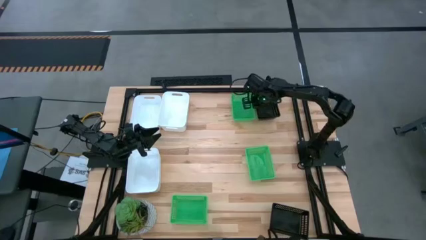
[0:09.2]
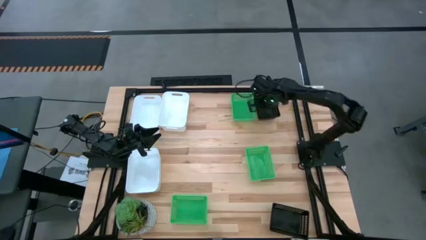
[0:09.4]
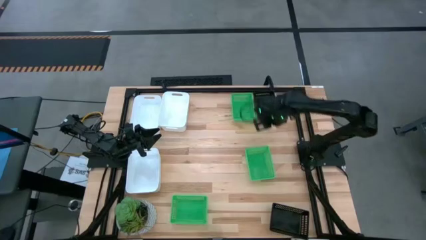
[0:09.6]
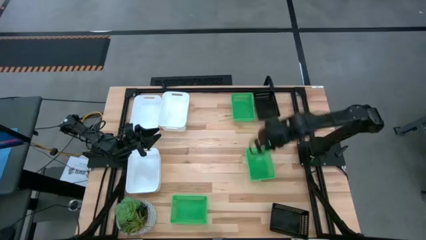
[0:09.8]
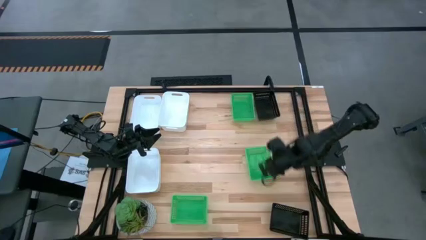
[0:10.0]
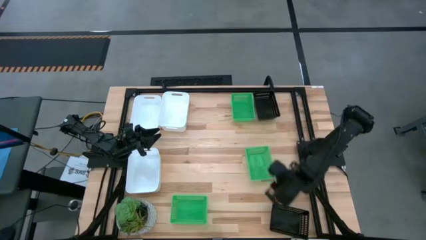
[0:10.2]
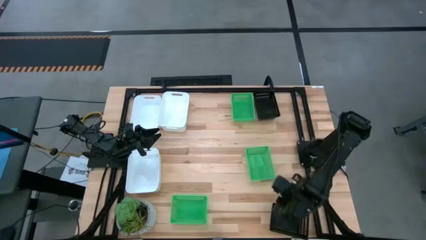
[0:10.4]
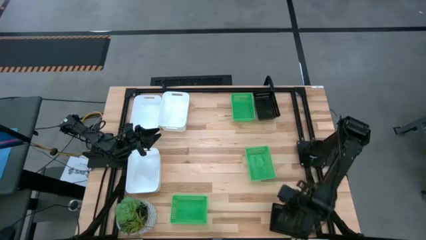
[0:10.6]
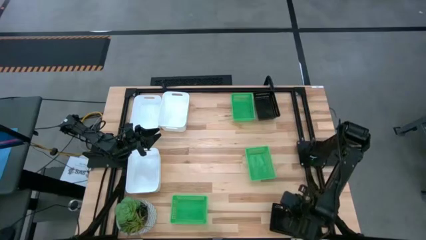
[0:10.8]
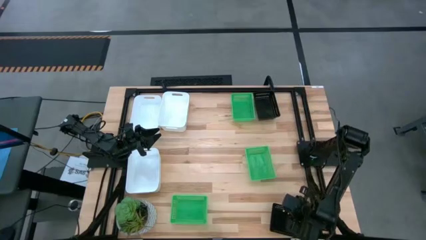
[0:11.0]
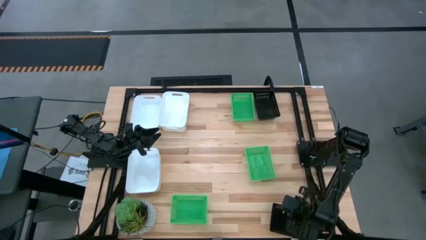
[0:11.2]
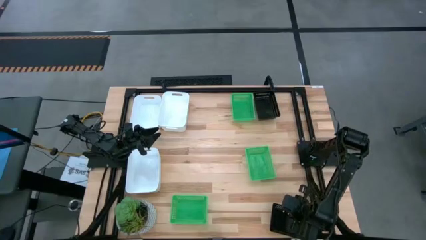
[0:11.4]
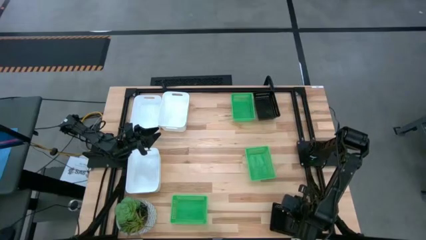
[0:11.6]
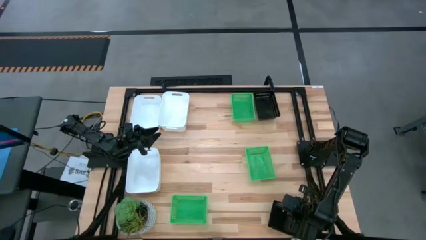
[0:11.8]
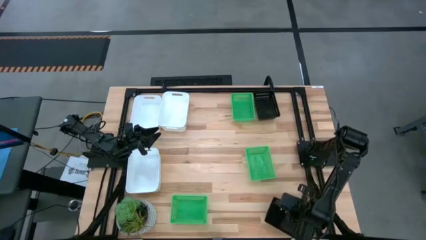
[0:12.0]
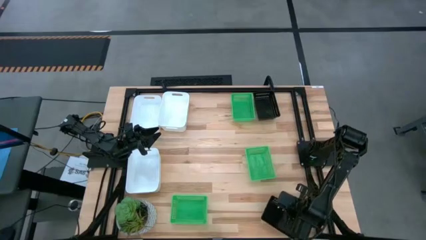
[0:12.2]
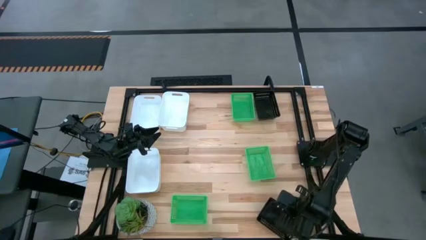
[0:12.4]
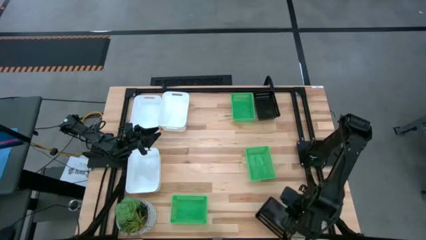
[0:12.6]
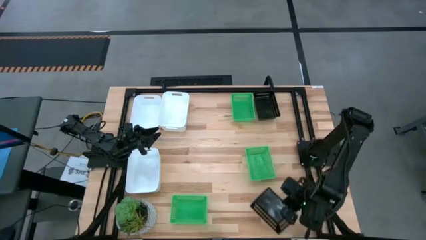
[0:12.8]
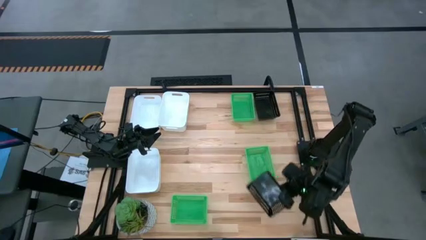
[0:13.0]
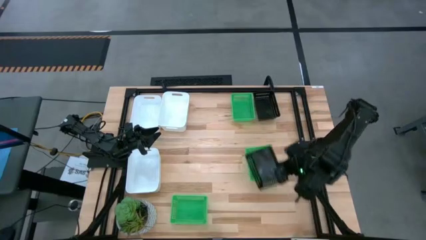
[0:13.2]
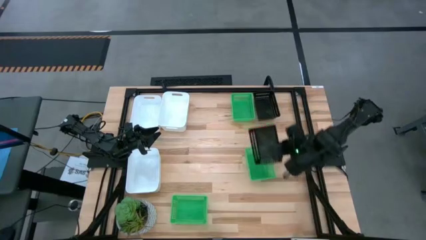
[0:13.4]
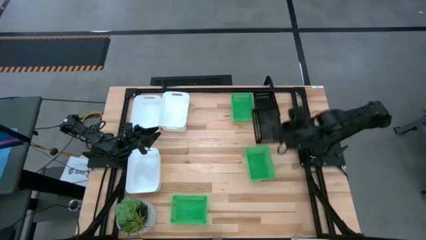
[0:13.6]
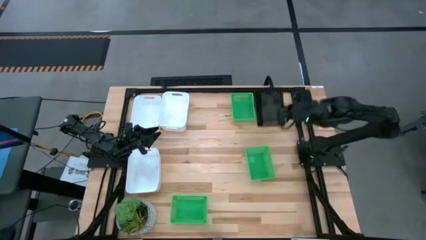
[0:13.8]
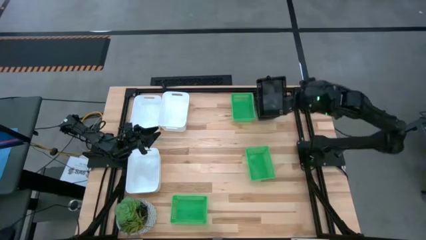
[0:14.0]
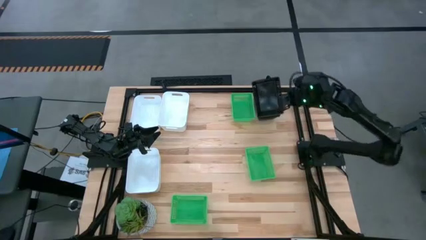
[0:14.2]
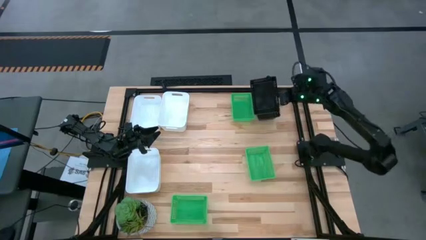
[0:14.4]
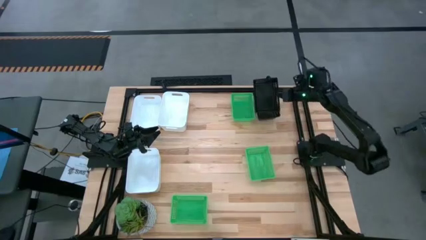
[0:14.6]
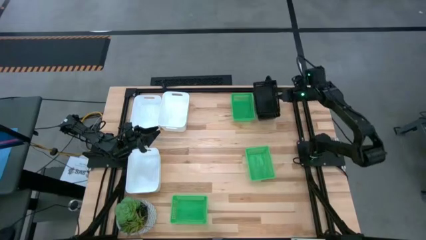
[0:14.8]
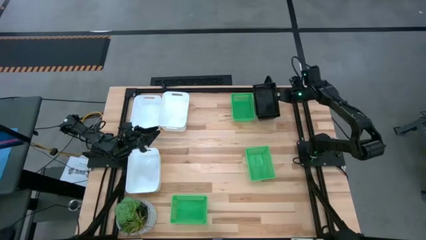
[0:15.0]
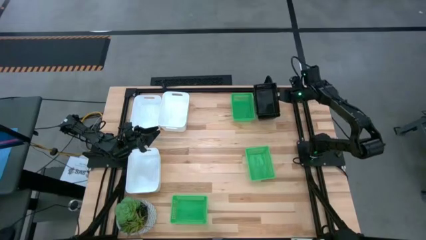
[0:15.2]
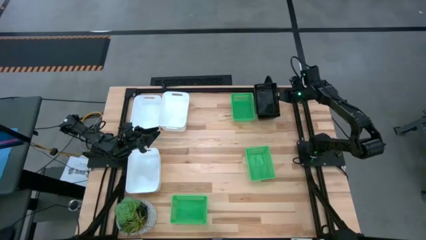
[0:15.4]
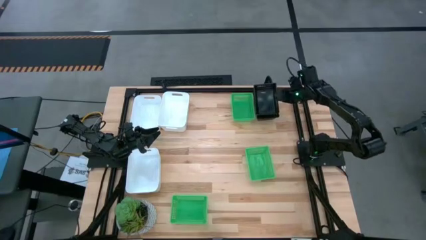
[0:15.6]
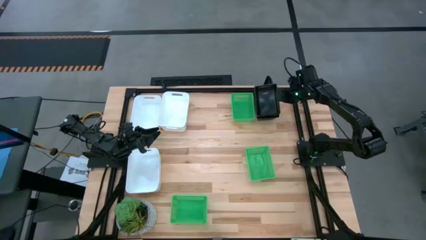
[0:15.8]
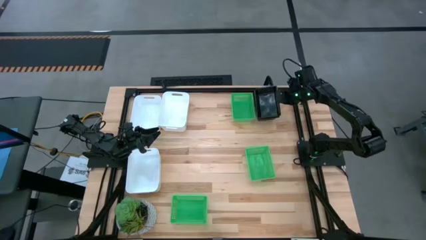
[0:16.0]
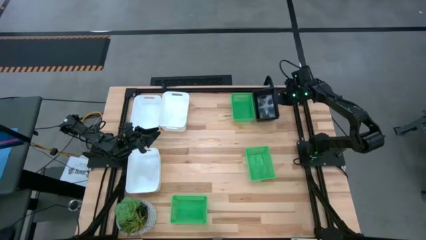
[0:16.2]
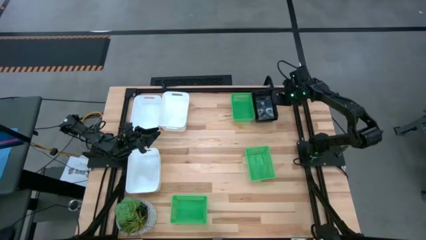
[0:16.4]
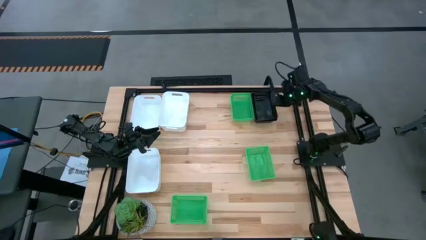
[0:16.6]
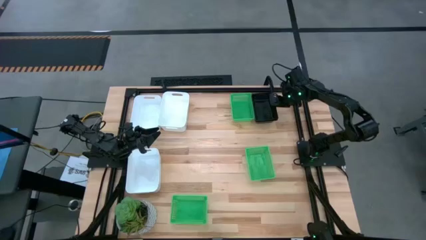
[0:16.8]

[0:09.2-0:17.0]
Stack the bottom black bin into the top black bin

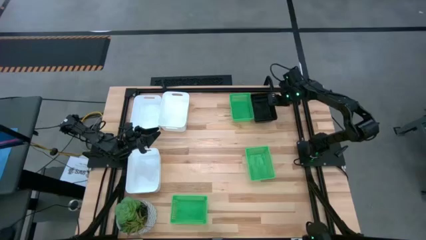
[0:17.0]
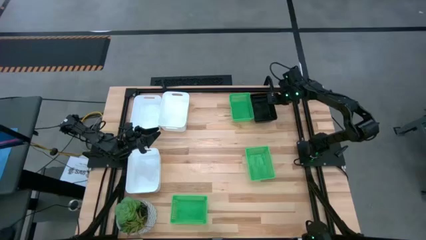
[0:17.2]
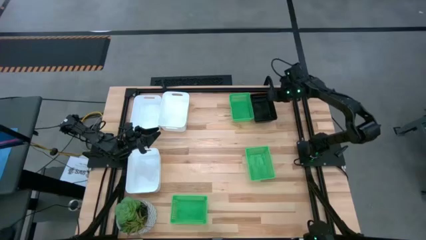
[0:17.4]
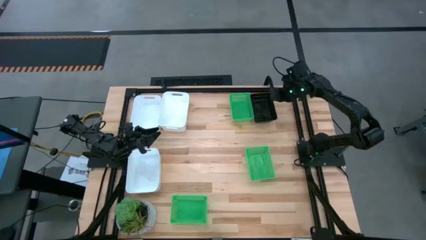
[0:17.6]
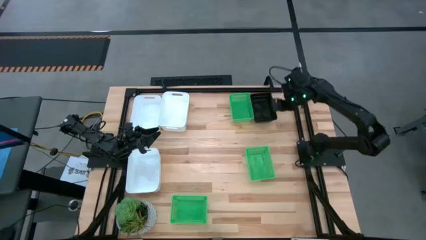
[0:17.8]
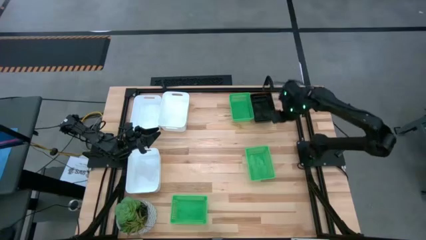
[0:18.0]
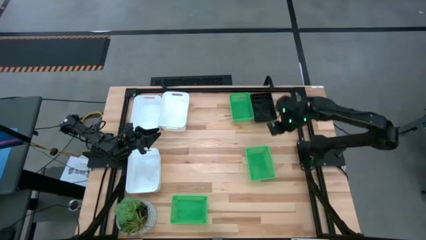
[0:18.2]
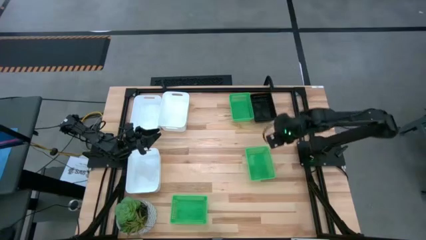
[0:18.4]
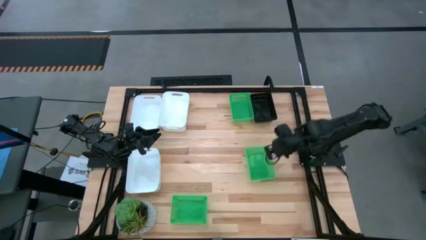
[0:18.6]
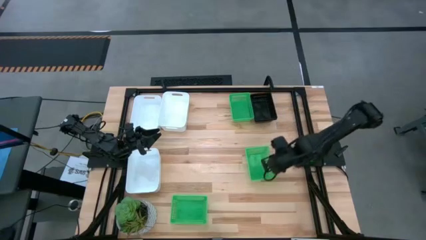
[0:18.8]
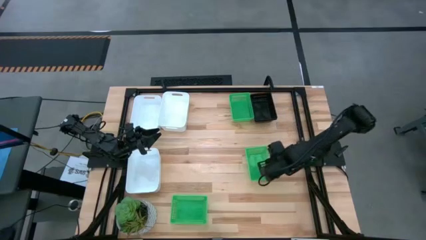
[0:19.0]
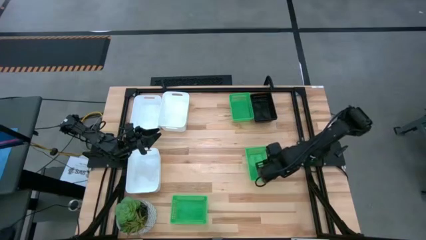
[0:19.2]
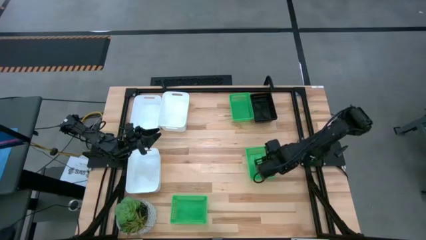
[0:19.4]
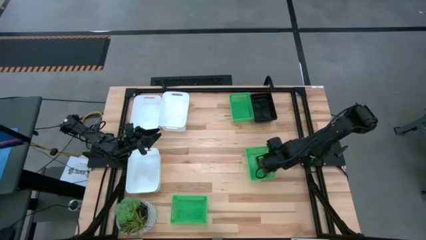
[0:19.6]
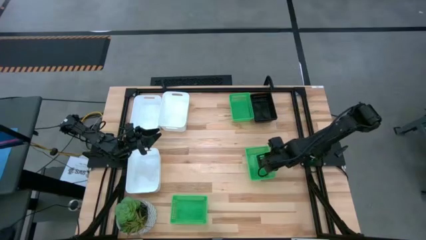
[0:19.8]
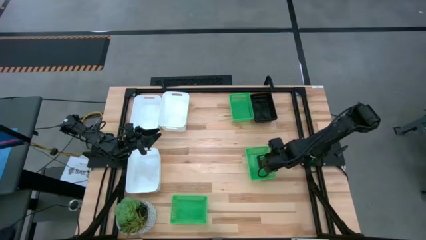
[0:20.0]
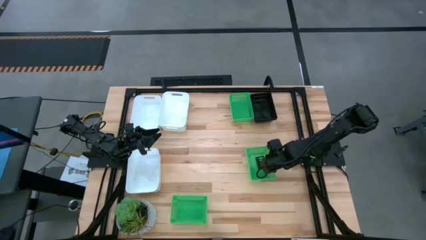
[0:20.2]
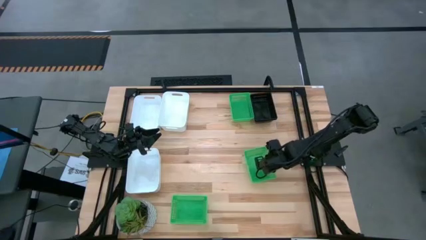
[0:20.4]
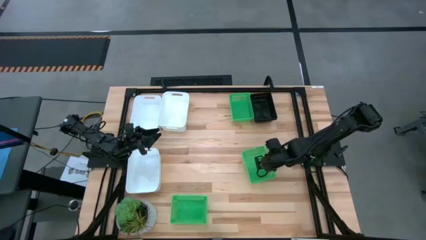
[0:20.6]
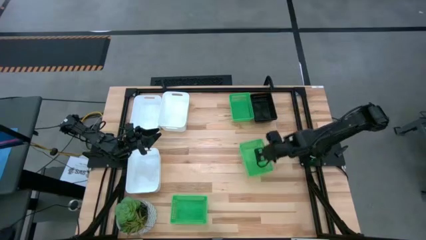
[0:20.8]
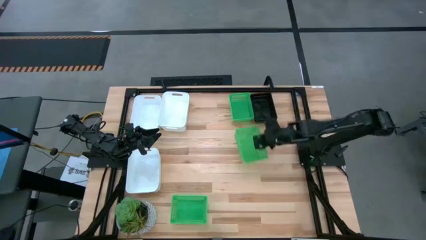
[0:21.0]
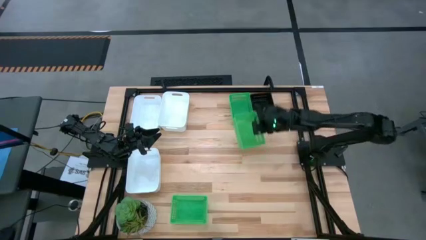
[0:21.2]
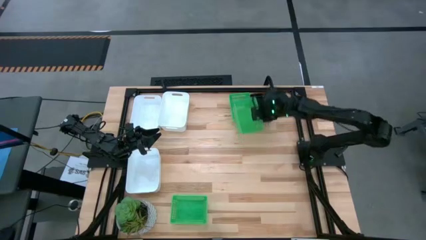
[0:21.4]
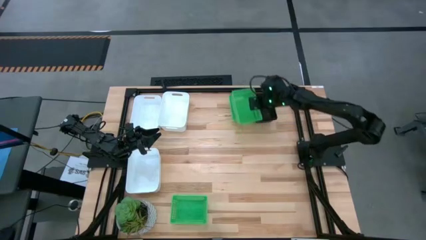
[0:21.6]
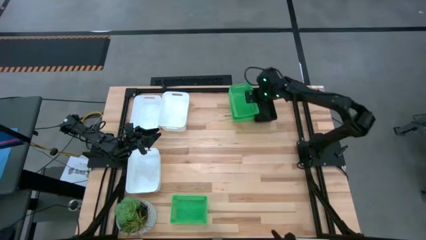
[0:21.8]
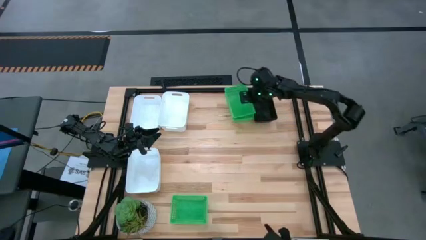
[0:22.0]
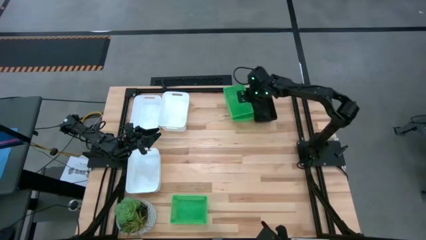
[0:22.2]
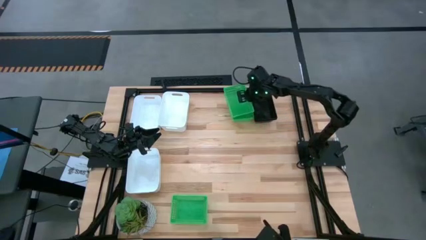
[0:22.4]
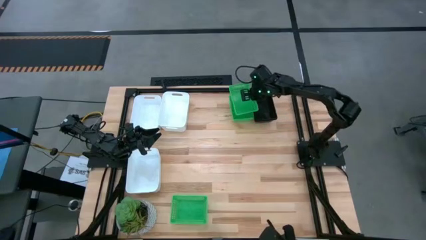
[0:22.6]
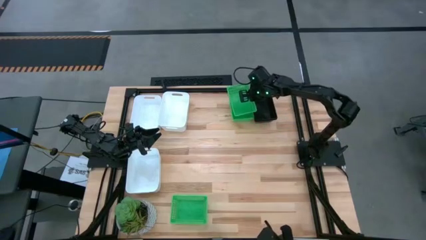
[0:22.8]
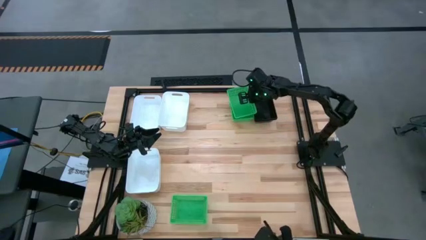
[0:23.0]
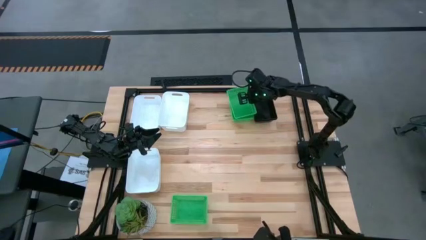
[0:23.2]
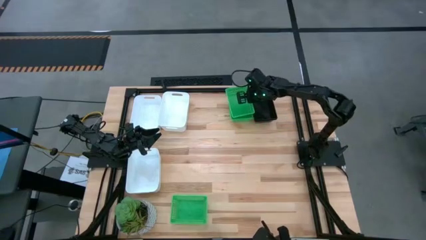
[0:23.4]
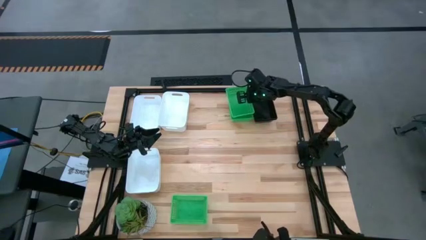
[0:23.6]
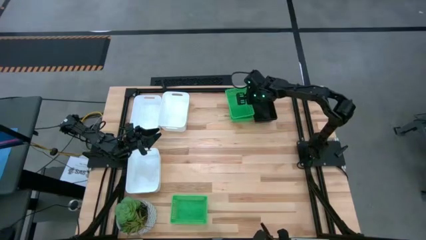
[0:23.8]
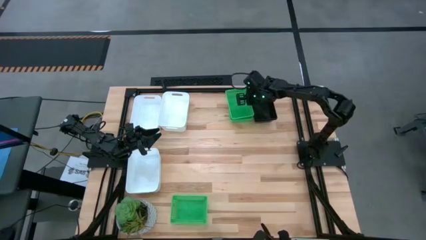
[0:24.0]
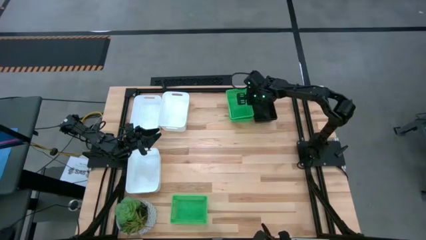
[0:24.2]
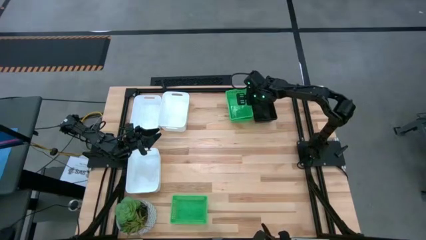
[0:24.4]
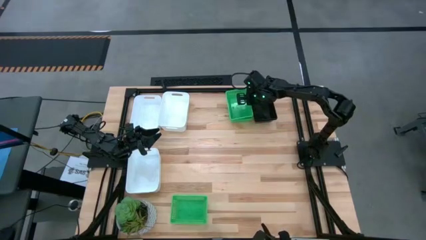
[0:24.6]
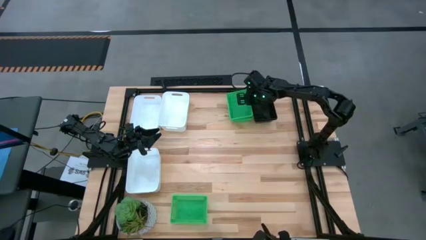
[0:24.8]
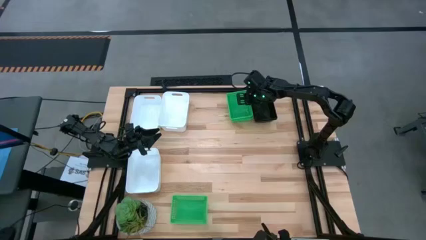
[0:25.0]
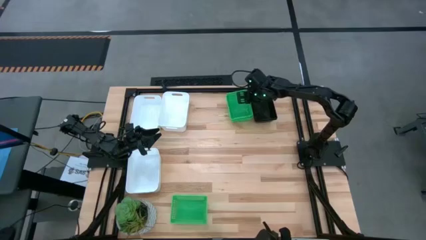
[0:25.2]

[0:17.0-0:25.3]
Stack the middle green bin into the top green bin
